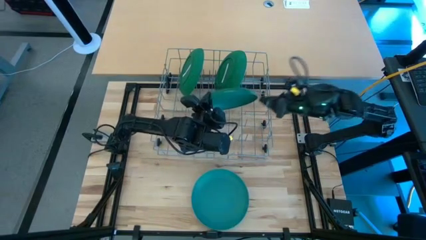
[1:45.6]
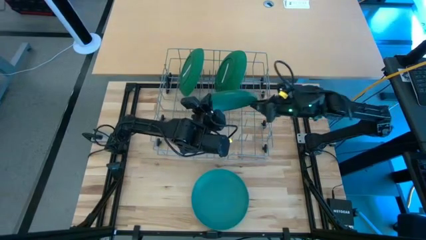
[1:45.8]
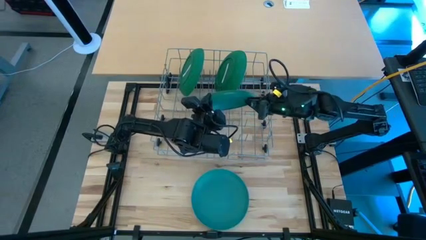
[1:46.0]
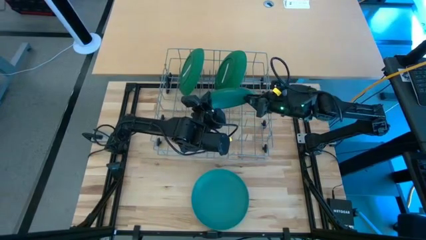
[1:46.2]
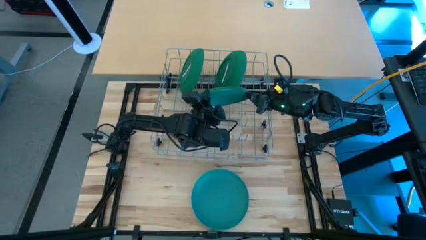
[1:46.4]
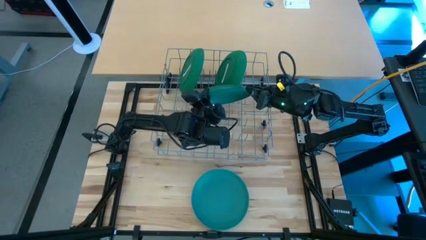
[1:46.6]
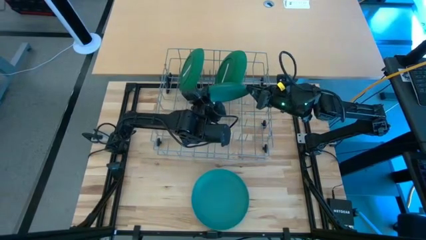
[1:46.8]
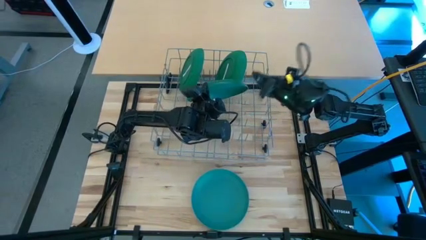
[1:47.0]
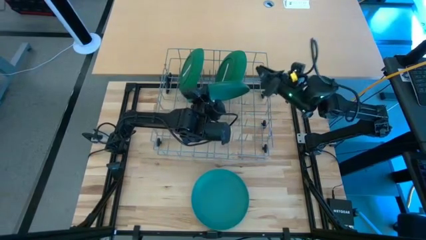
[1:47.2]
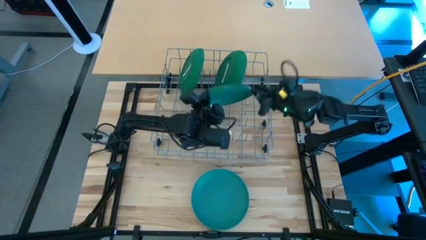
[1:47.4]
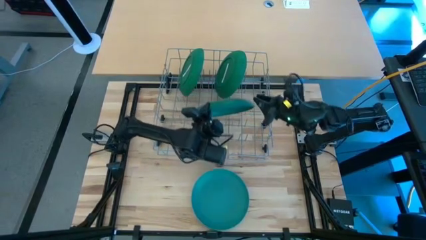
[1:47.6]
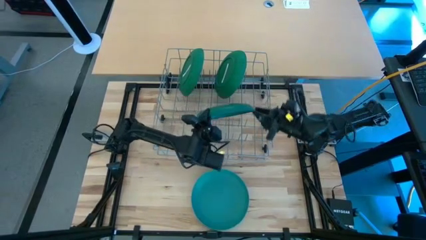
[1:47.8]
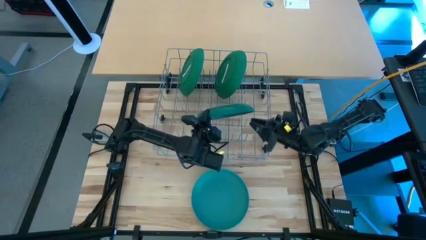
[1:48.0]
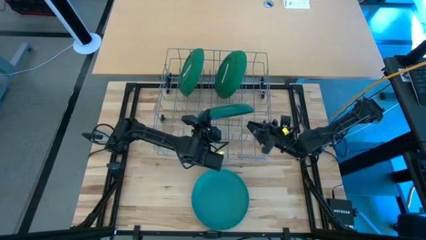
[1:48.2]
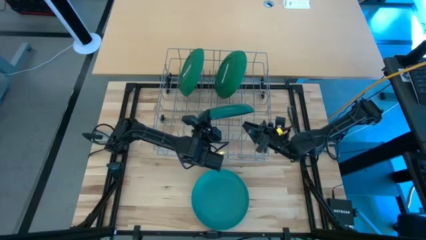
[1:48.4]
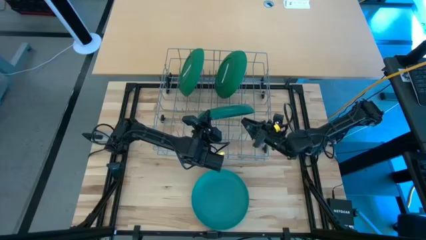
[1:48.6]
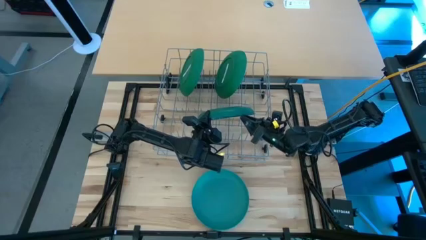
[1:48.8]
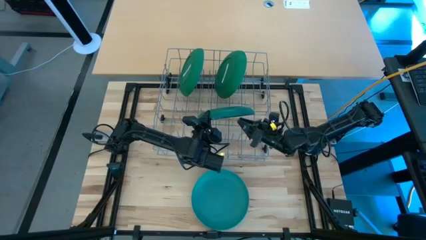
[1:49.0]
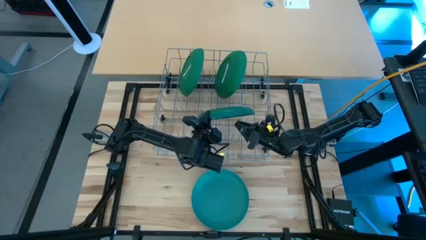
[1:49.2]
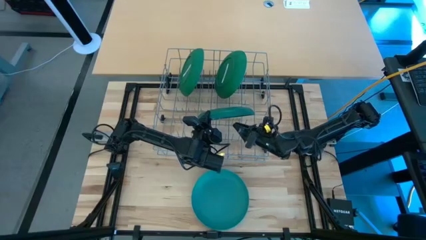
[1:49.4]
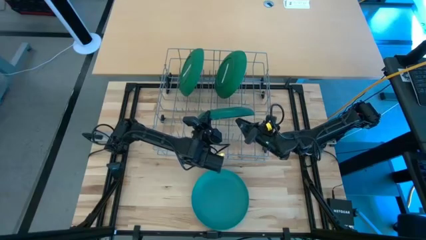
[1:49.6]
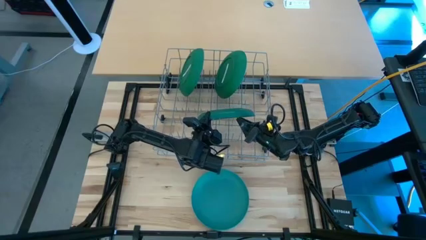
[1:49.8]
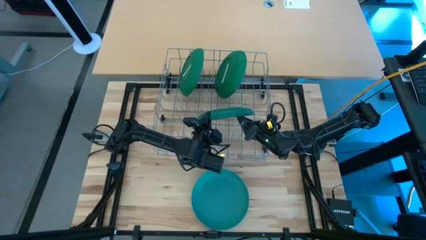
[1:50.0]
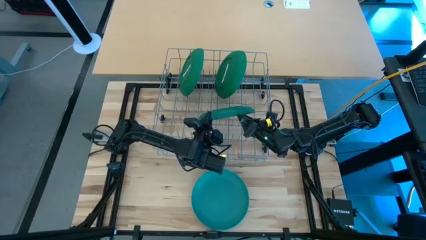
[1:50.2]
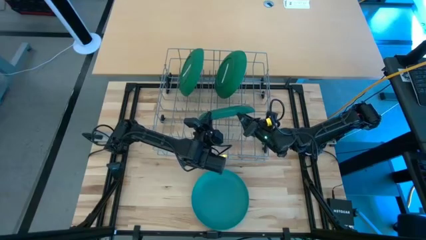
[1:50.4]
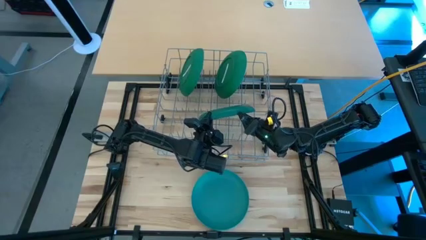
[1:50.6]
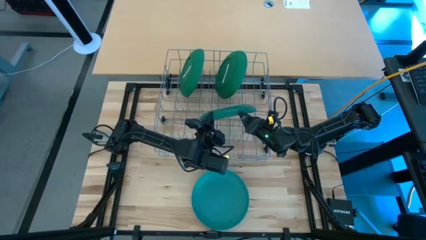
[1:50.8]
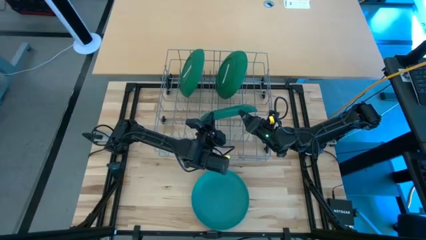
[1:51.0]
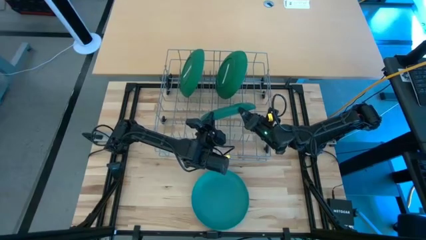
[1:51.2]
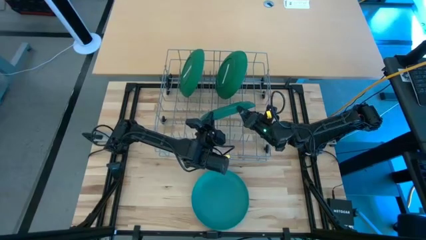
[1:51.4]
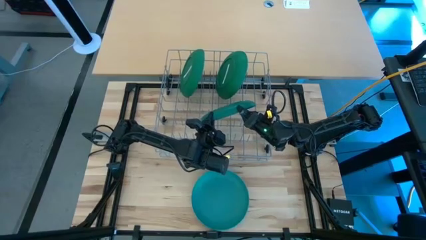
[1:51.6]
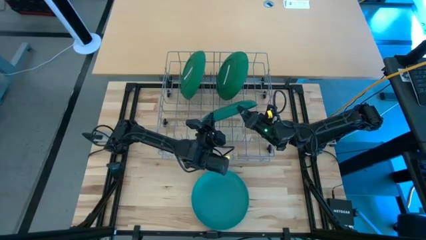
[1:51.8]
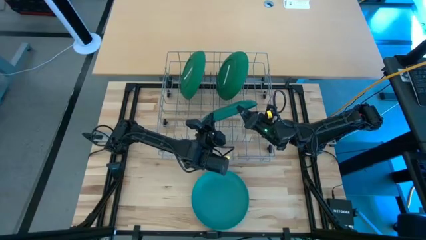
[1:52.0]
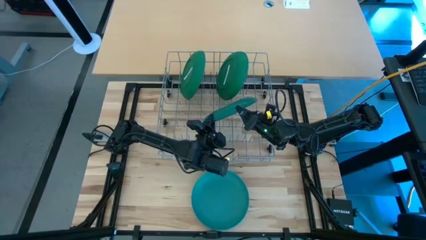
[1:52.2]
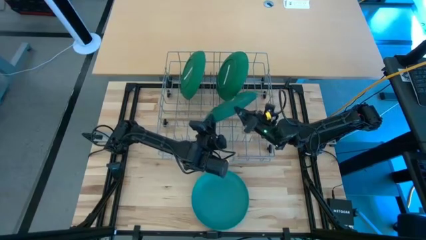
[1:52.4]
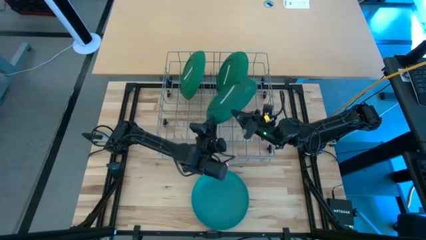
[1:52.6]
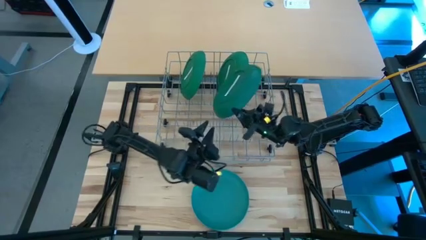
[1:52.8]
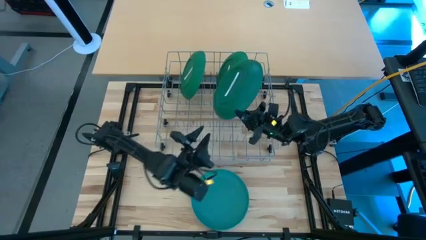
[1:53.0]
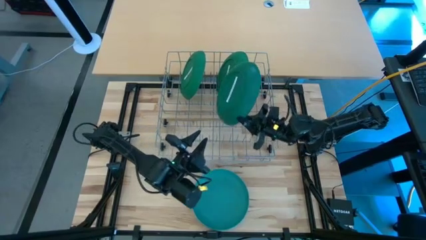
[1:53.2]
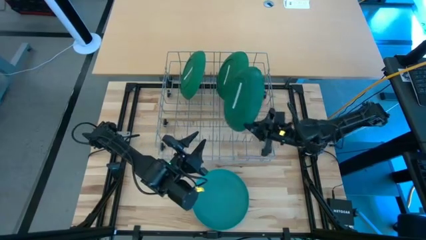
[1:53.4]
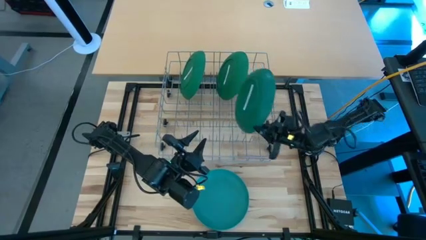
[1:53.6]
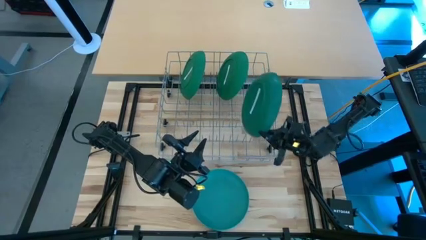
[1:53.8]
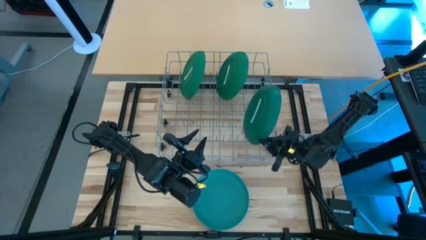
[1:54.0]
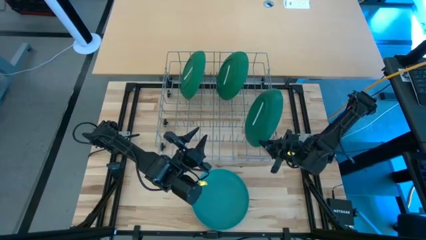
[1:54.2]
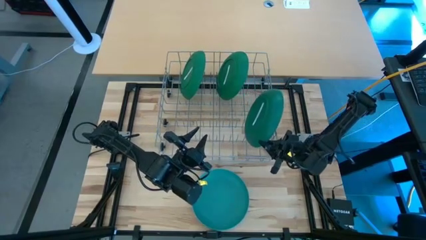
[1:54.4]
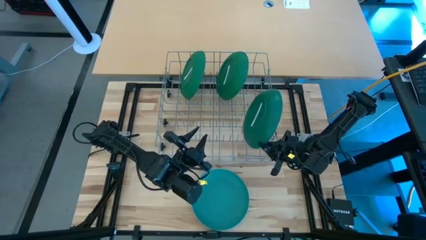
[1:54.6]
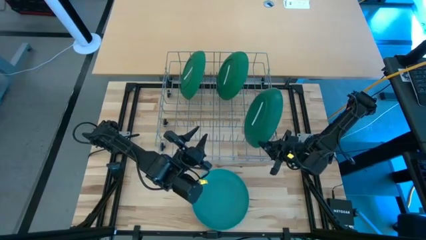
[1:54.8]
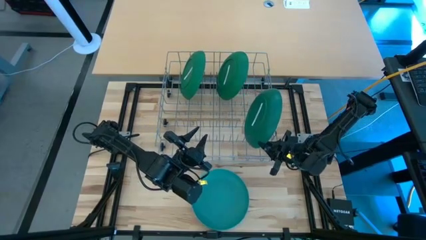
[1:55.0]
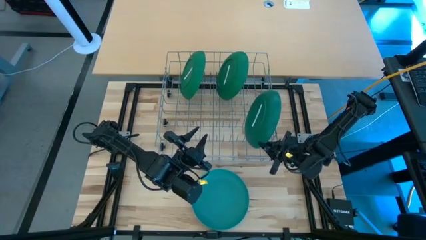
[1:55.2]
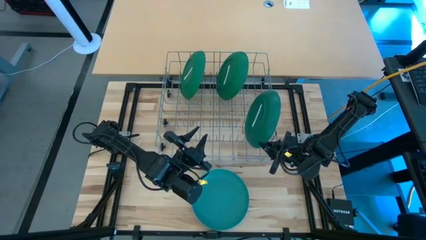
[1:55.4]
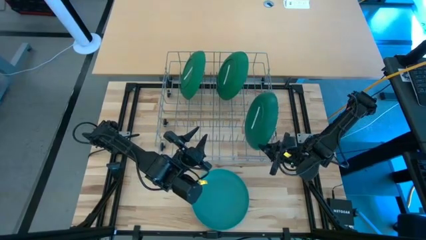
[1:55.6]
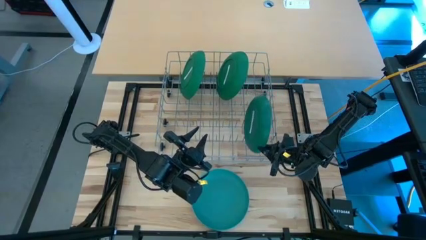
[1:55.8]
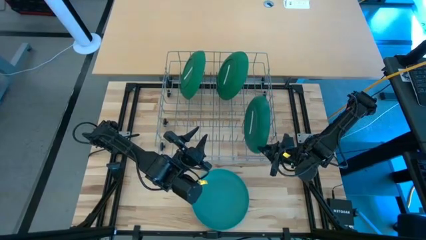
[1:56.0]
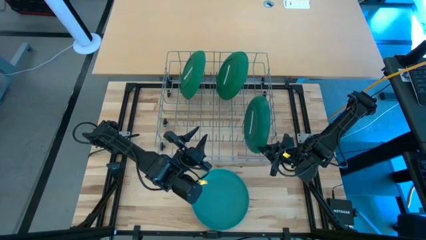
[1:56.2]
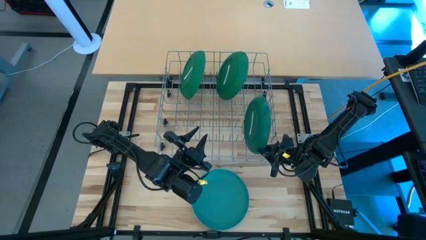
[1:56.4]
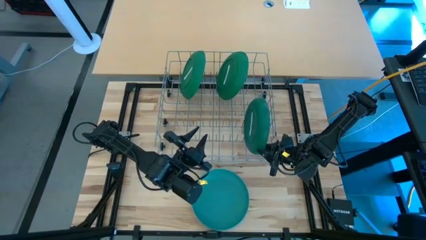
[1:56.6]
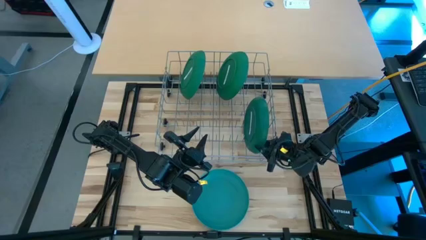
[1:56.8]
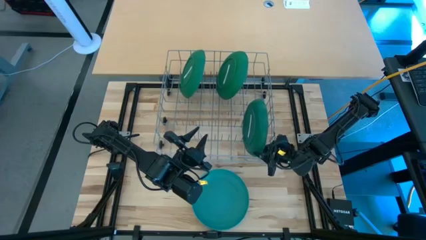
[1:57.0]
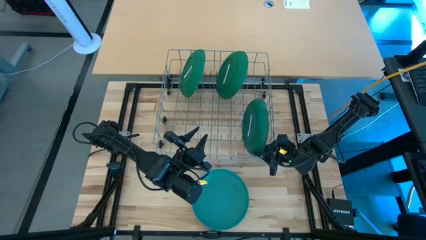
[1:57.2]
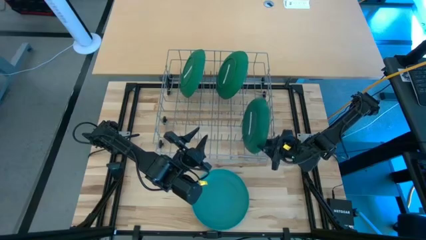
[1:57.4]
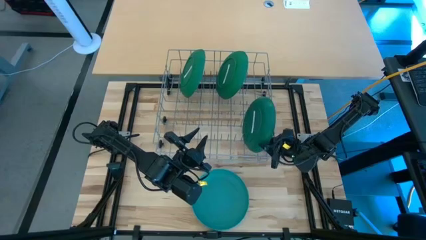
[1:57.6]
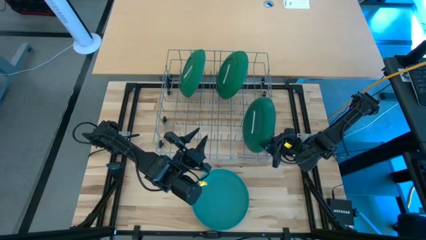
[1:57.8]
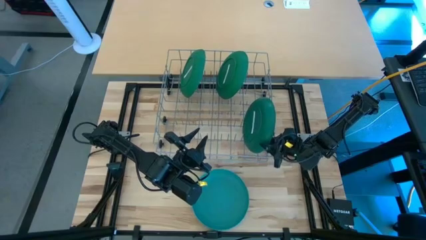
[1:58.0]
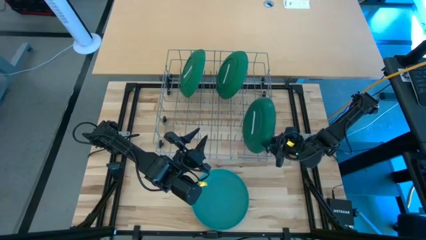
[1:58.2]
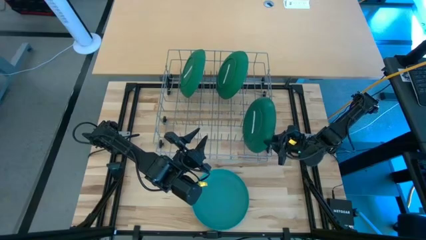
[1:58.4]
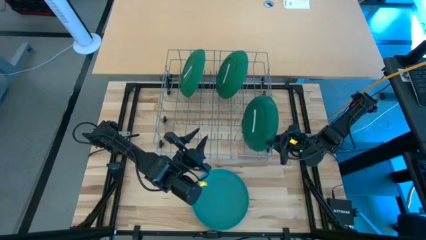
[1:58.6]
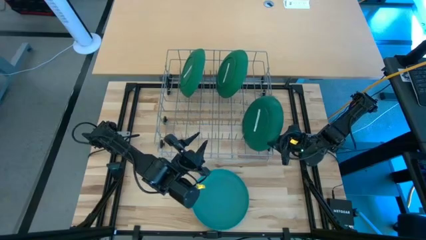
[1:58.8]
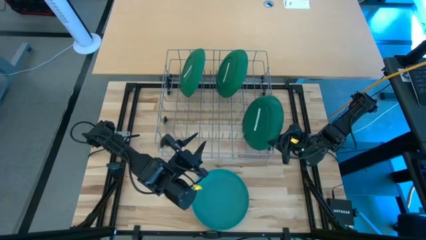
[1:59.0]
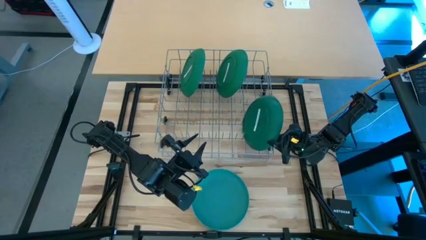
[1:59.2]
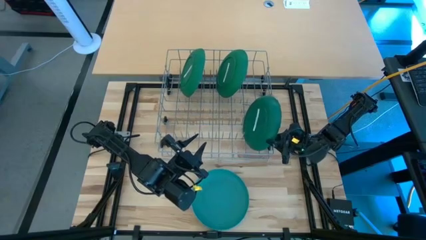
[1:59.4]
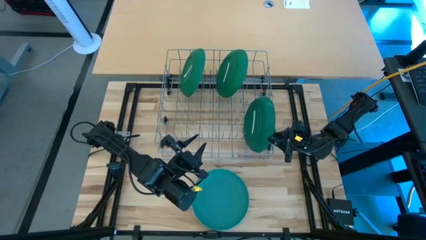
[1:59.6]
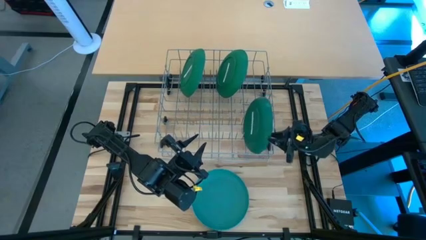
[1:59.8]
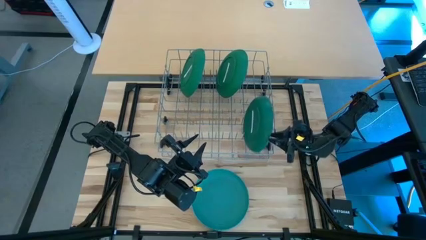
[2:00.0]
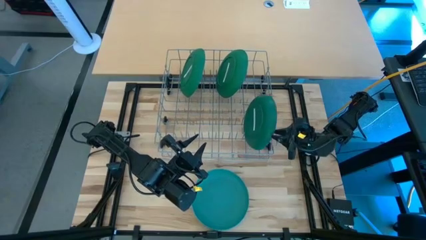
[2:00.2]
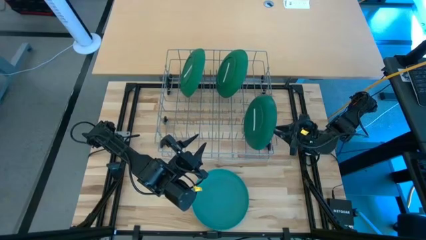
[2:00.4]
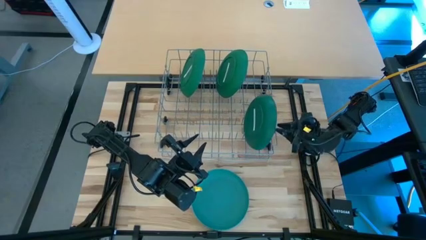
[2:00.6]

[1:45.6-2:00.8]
Task: Sort dishes
Put the top green plate in the dish rack
